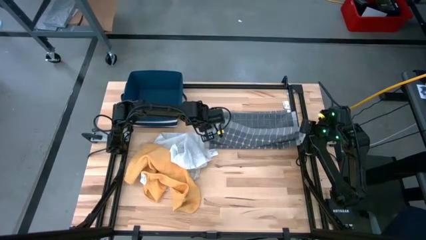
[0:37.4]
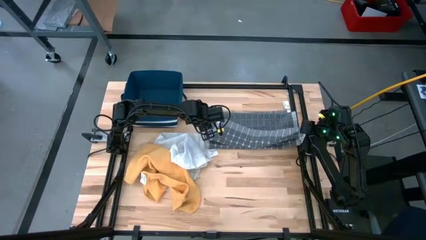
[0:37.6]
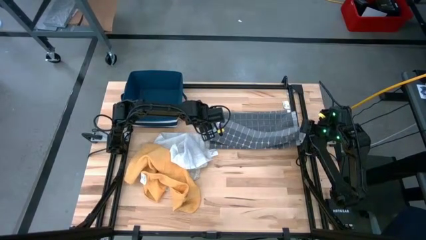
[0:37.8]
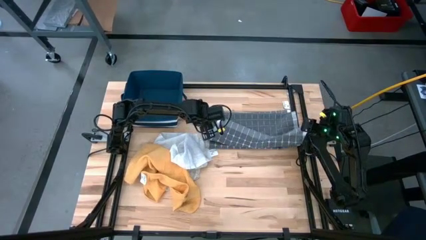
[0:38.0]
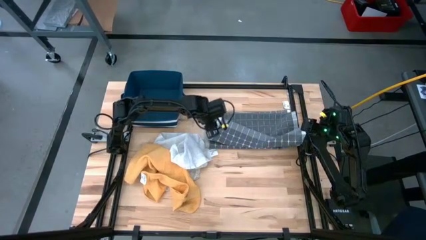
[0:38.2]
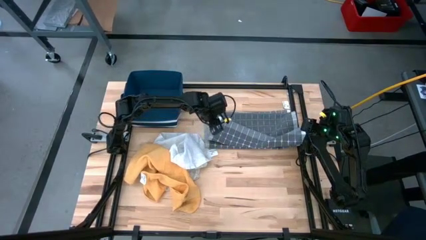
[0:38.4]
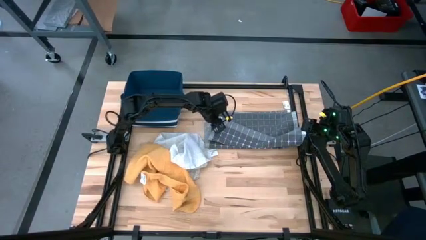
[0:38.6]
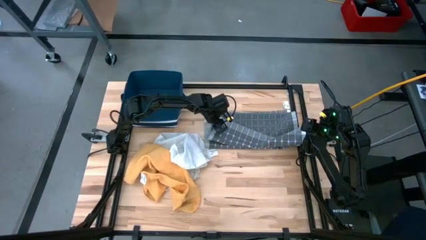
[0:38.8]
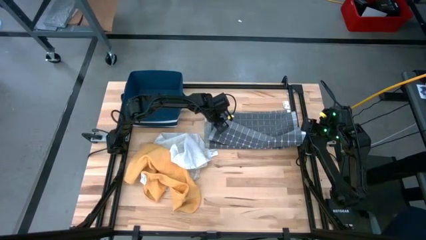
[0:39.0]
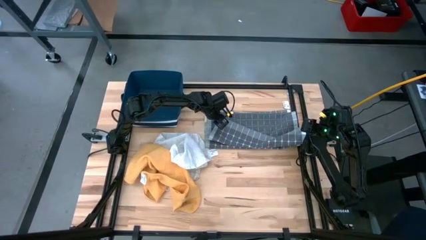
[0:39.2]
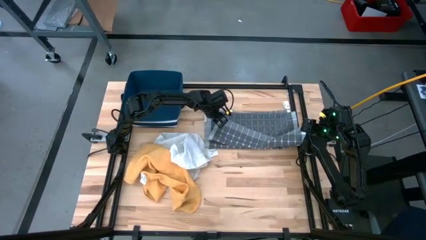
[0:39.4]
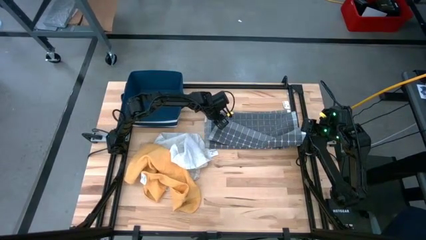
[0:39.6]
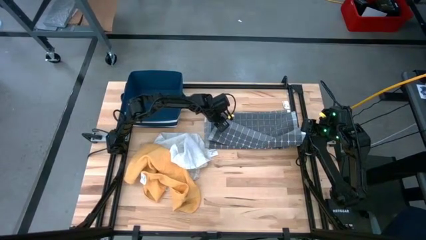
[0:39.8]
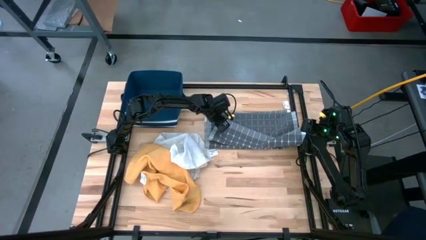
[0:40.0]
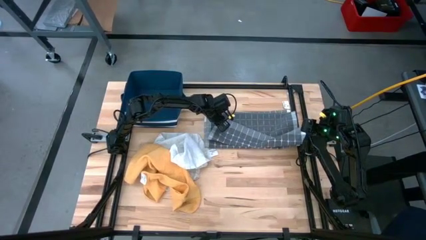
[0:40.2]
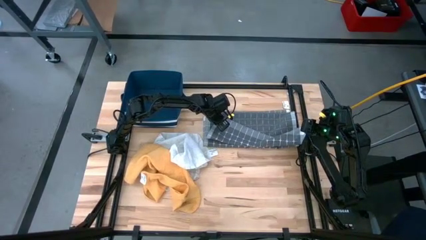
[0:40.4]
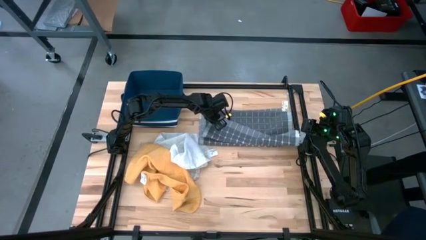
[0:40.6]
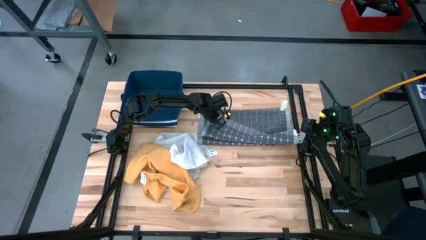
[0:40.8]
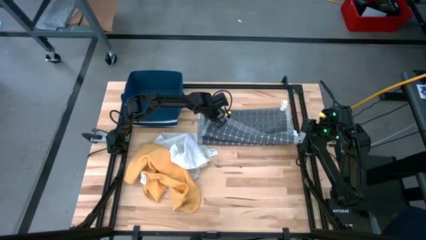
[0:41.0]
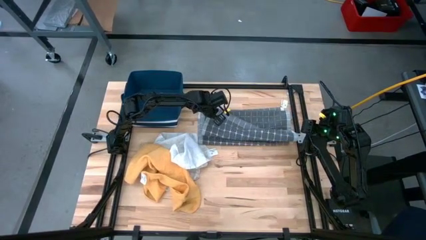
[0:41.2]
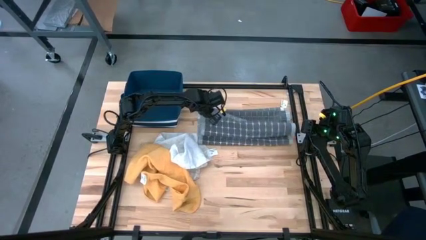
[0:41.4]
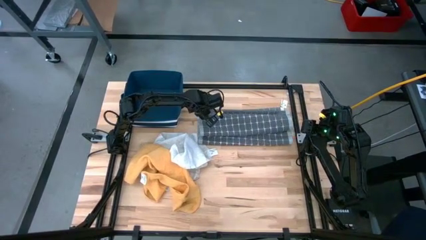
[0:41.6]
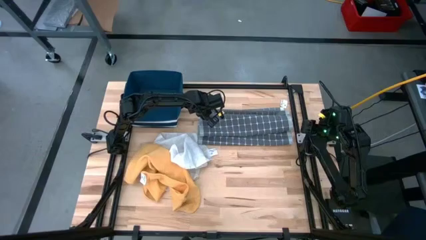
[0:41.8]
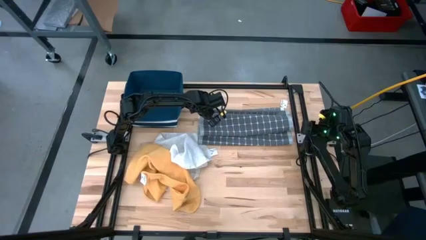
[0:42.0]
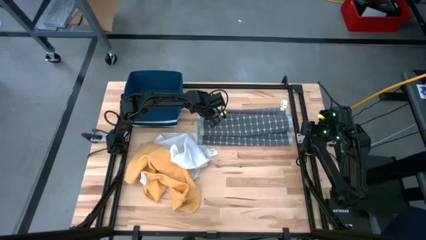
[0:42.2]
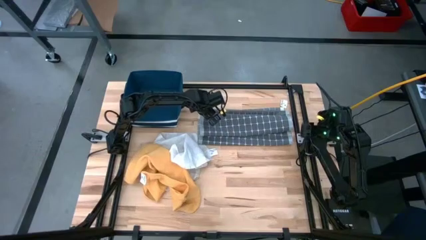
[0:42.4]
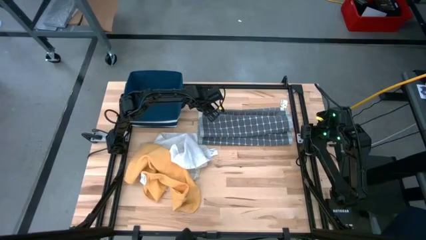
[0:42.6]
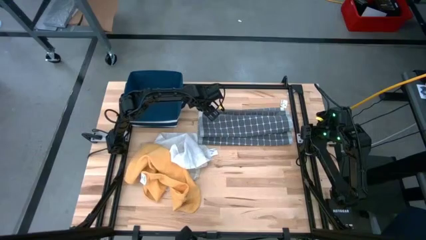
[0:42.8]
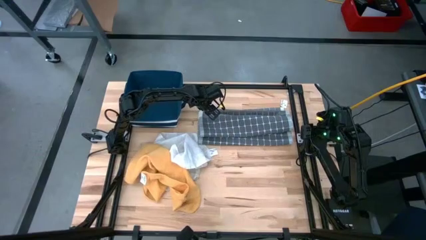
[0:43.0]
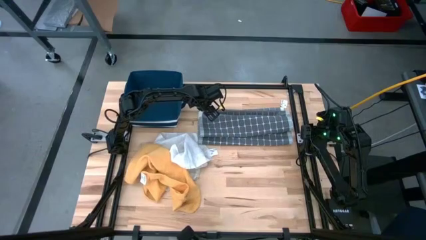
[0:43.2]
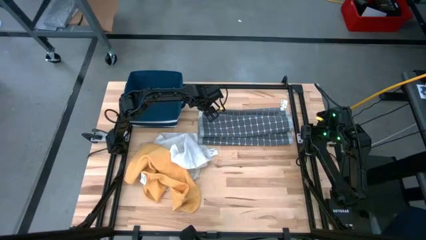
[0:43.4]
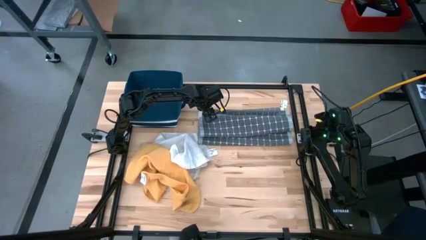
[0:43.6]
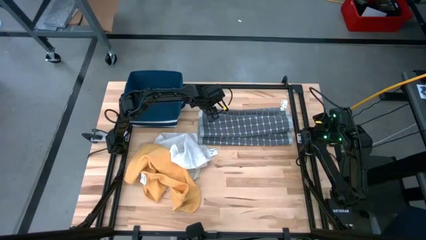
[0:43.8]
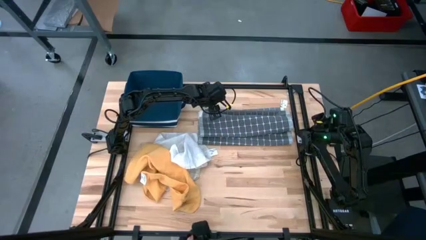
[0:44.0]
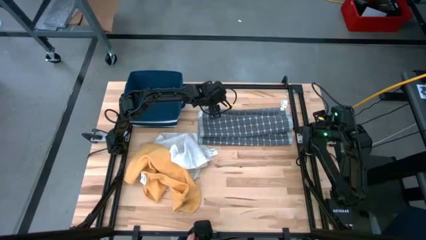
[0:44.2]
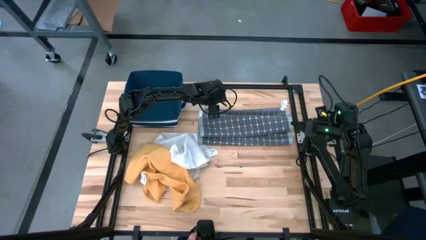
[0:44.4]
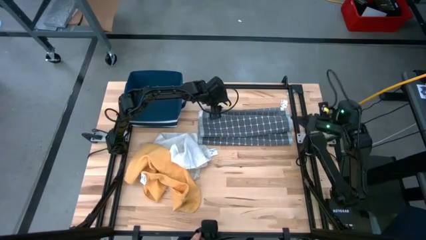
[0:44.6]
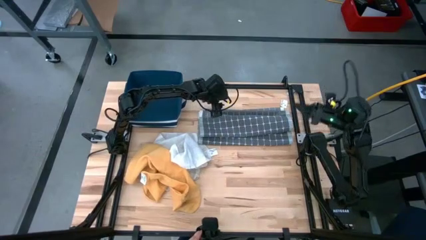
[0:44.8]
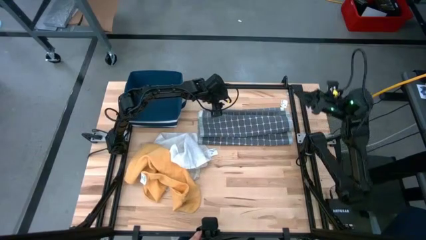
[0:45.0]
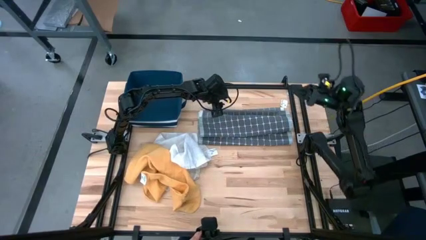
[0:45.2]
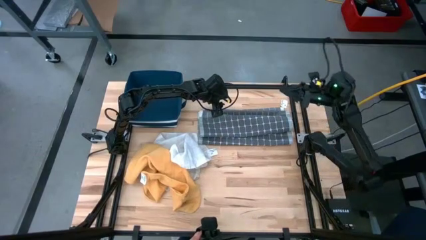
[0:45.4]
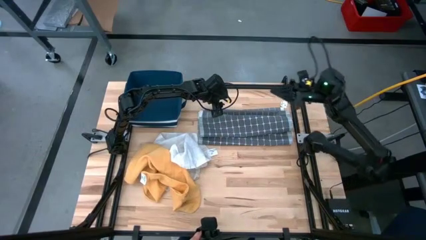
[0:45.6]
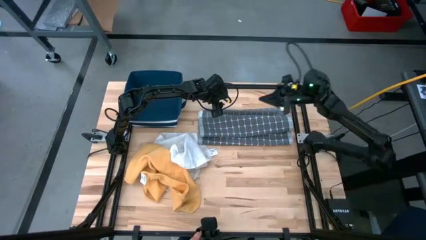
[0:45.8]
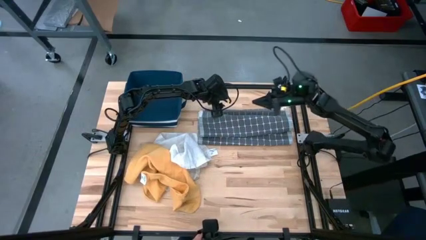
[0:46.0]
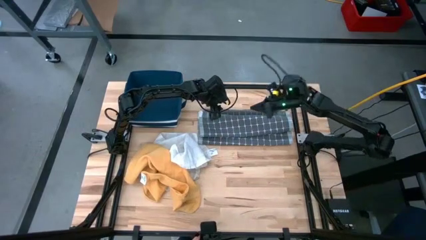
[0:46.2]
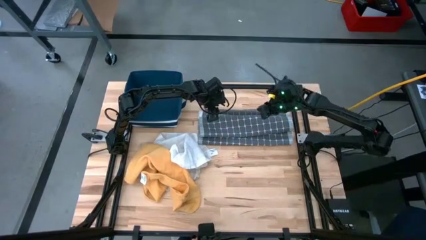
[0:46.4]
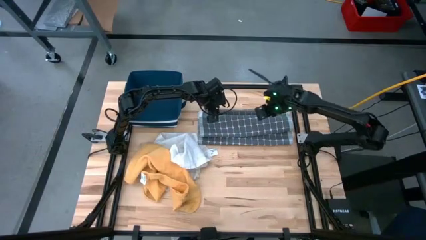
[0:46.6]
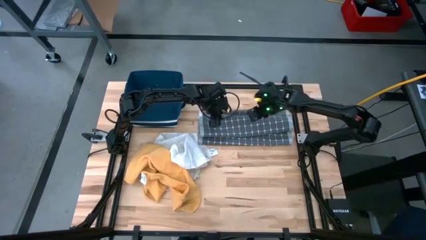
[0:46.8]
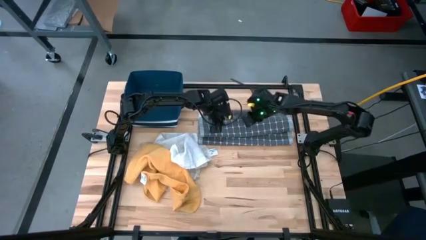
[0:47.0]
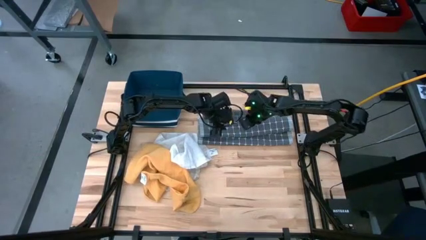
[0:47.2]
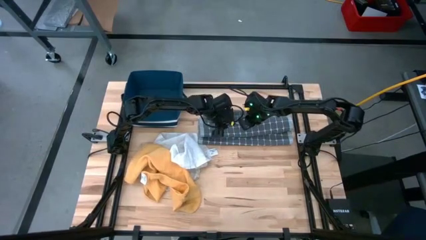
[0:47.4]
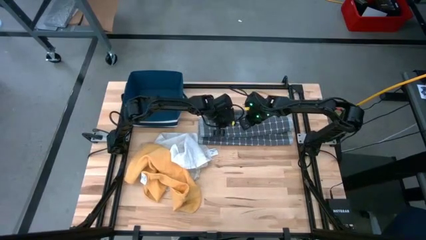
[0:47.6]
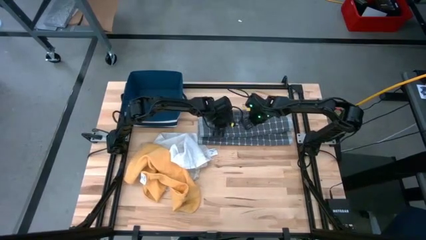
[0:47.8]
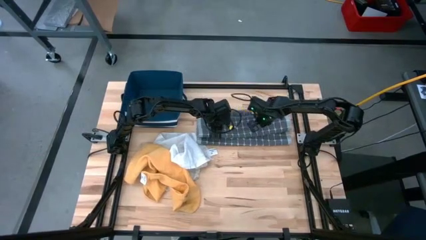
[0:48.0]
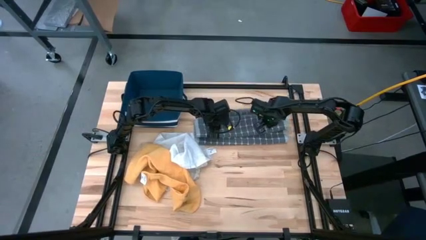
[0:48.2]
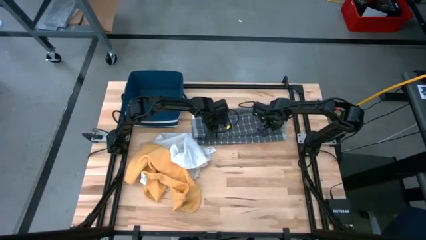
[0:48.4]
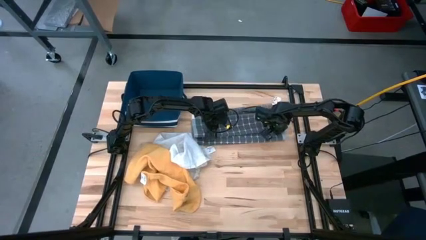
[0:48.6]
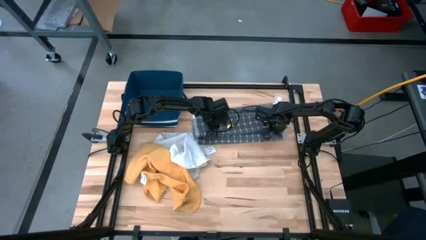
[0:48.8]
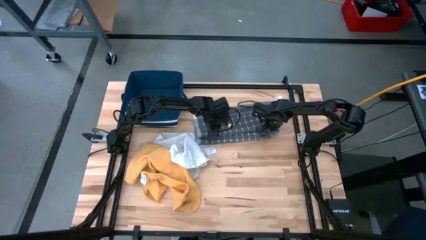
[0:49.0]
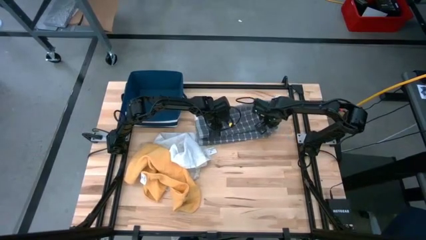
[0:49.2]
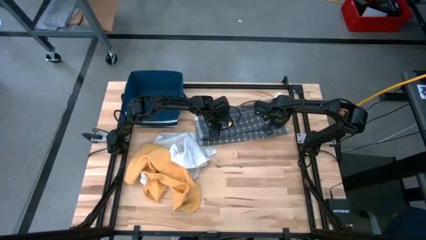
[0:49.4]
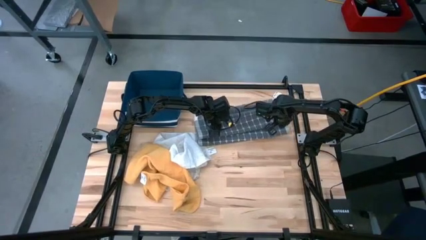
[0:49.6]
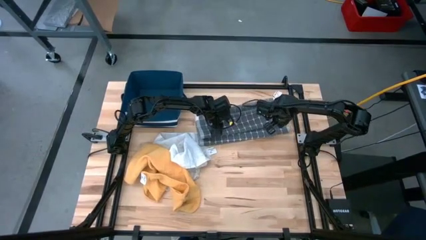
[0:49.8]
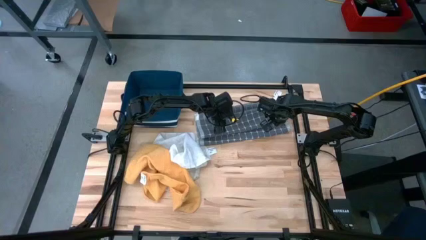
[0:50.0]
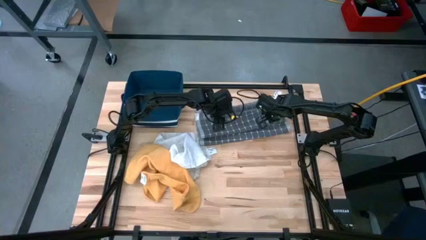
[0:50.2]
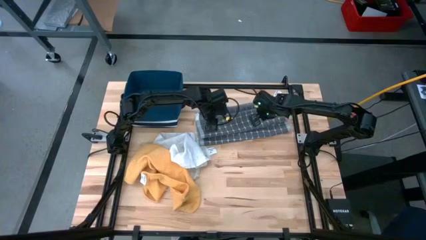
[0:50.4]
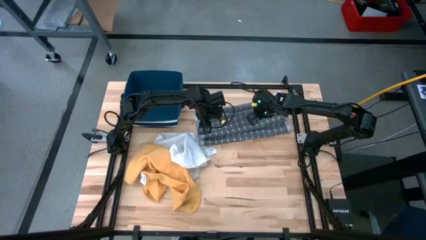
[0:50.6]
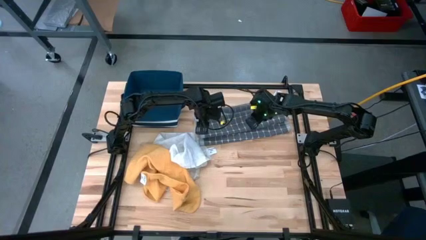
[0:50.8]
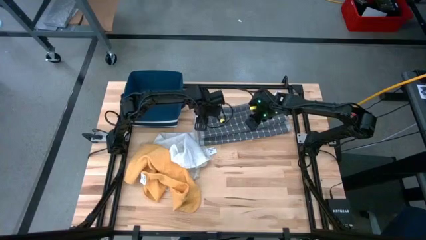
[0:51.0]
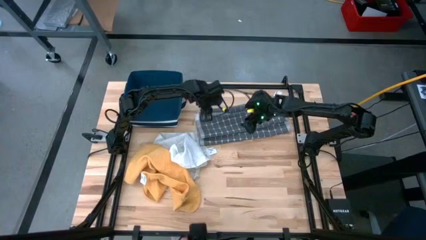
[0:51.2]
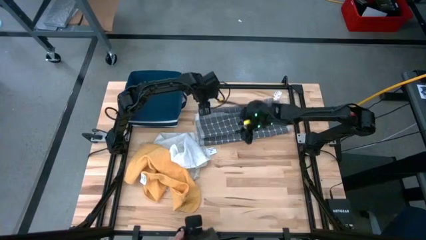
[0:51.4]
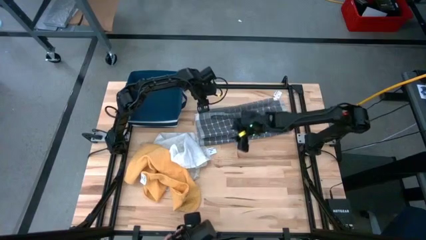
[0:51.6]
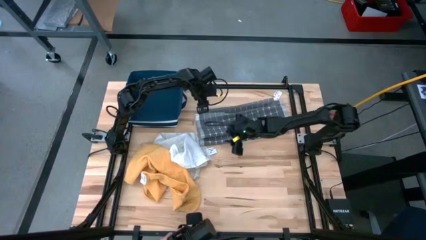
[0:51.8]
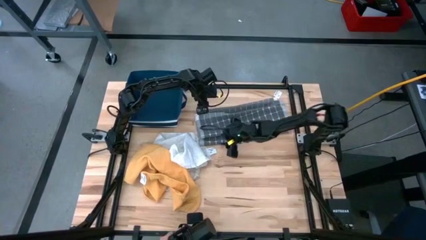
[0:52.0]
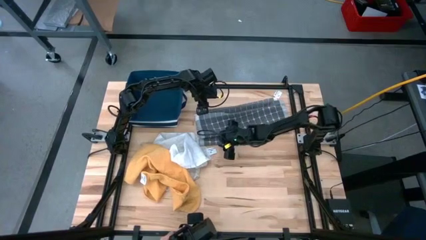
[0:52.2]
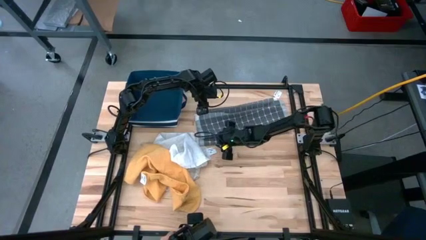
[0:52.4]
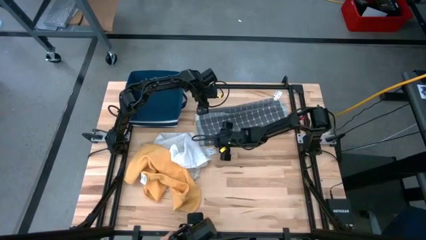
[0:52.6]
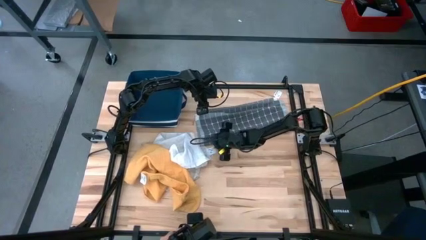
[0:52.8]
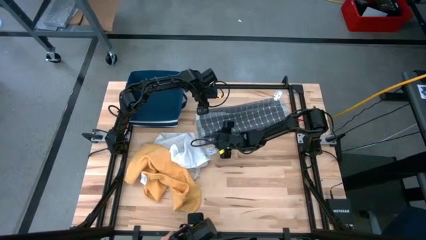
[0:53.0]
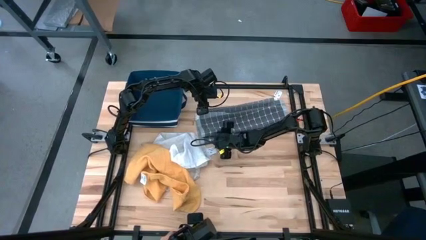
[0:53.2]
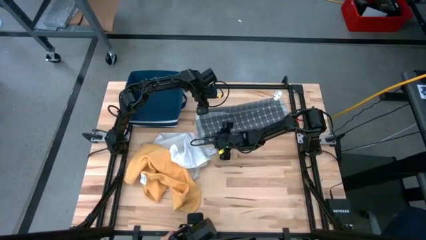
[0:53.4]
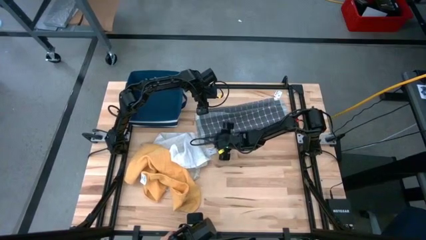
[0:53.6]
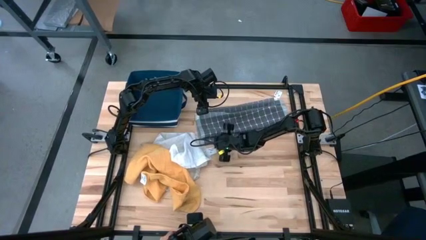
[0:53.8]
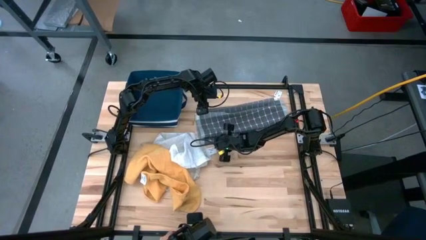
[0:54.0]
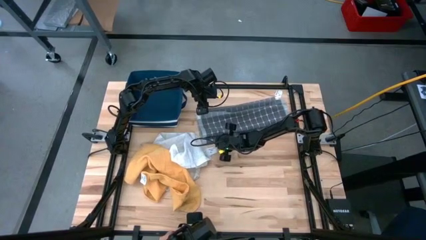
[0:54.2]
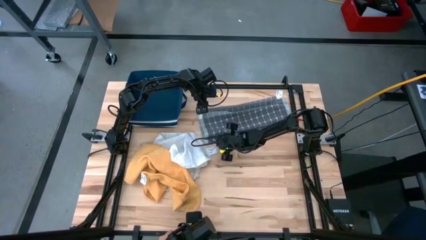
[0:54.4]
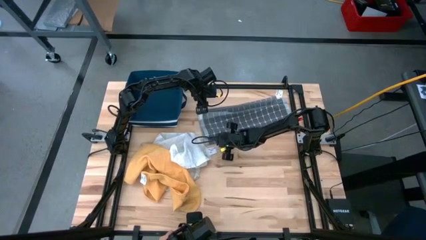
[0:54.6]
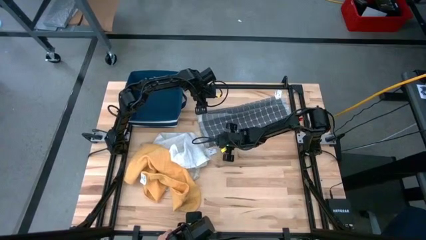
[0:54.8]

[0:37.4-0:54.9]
Task: Fold towel
Fold the gray towel
